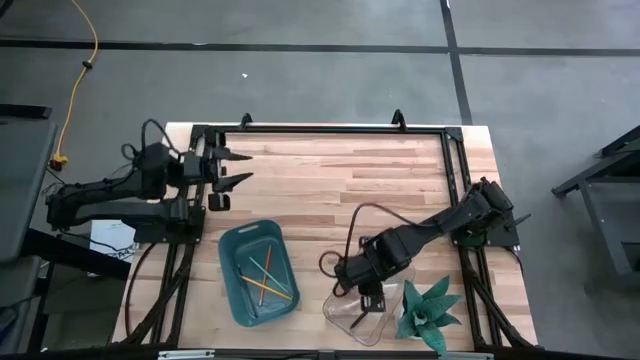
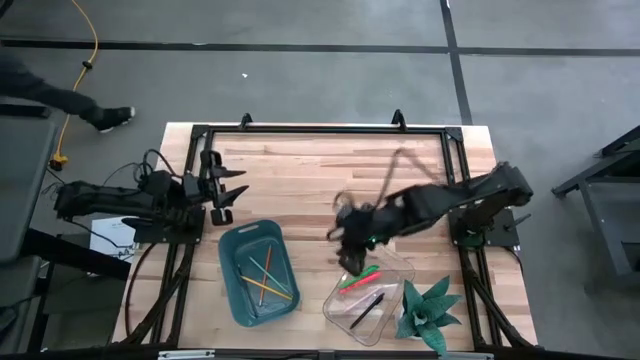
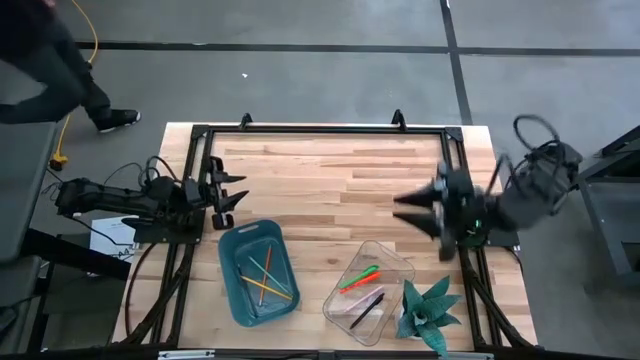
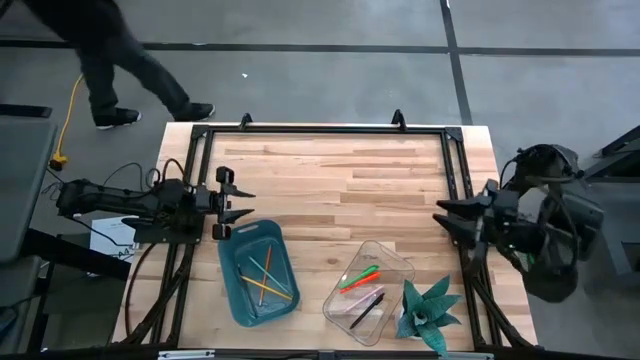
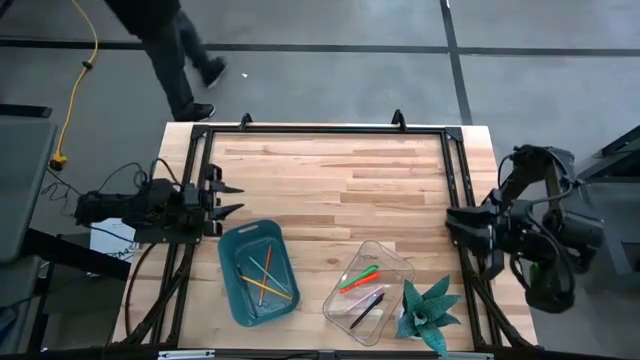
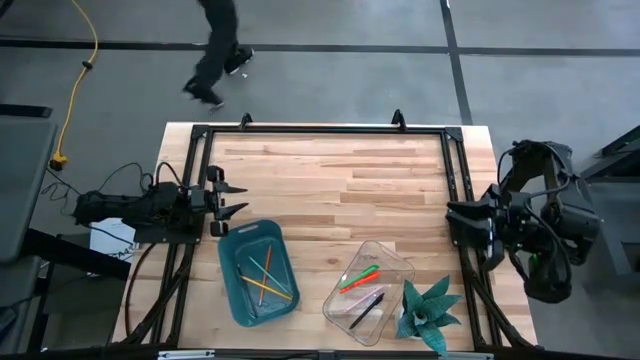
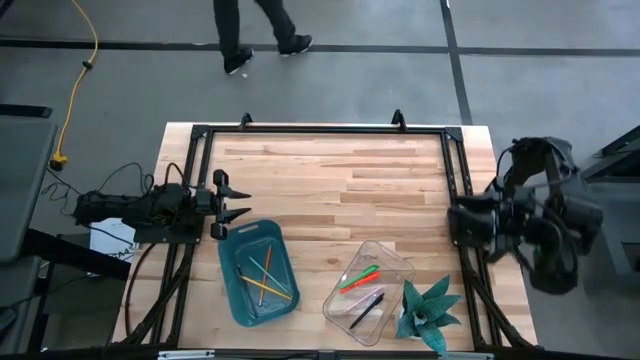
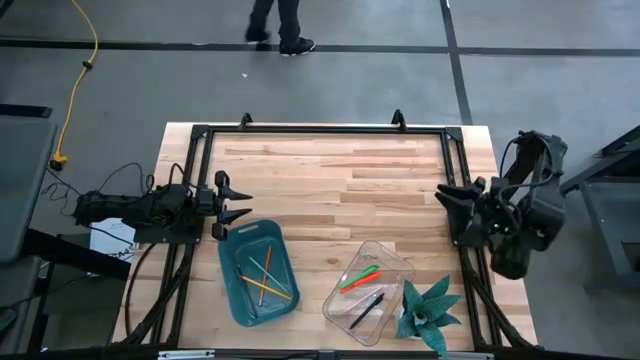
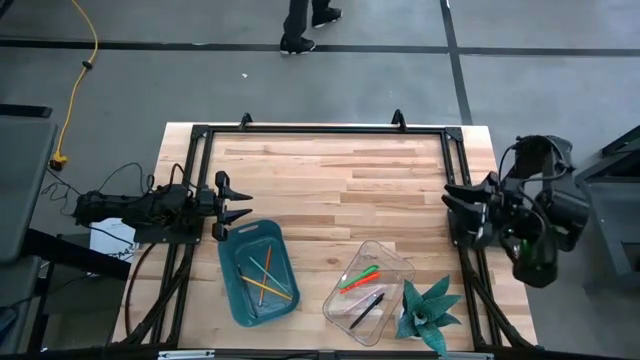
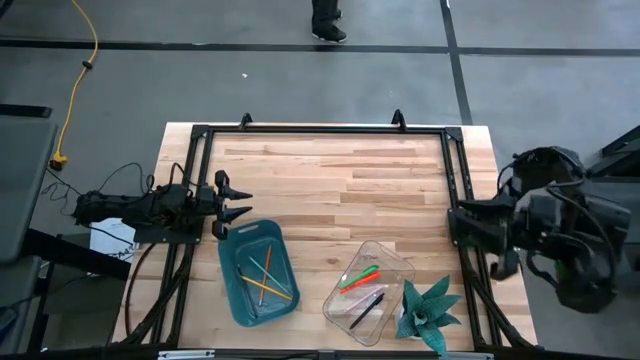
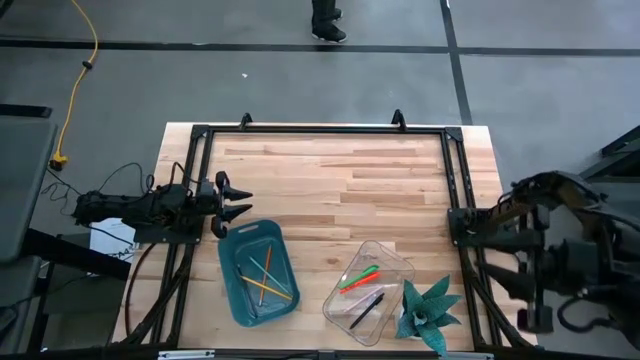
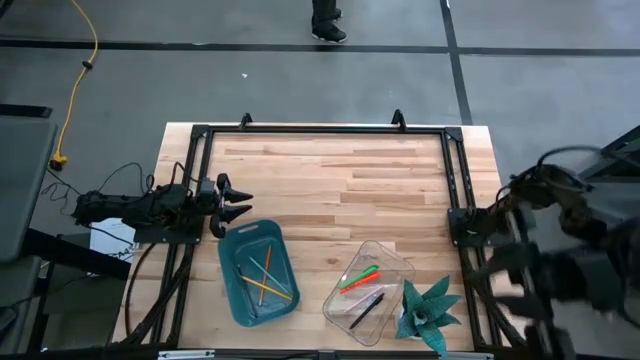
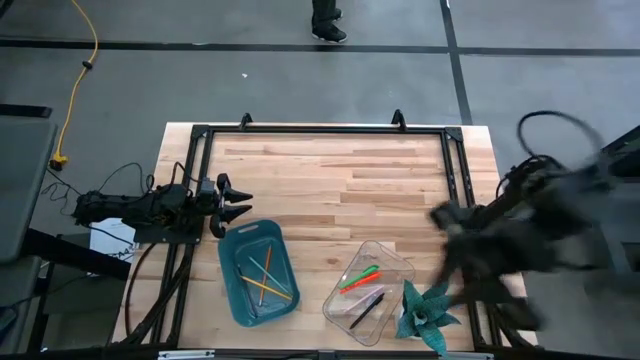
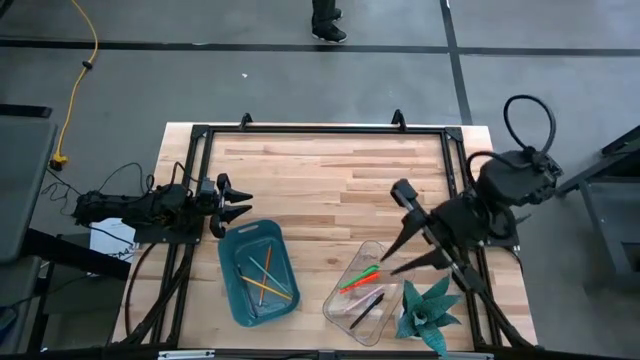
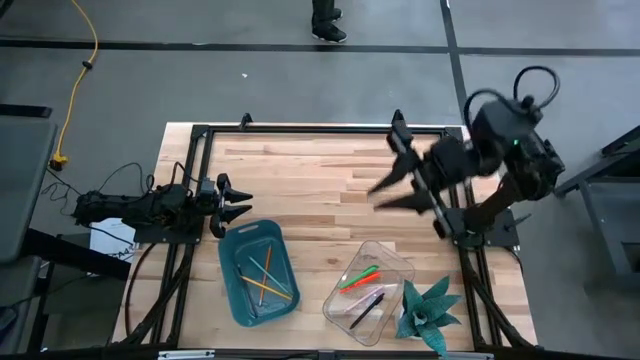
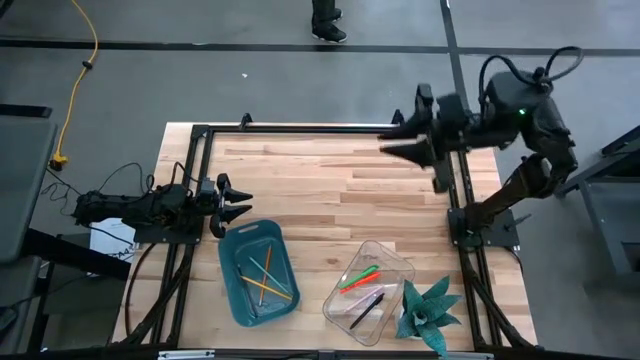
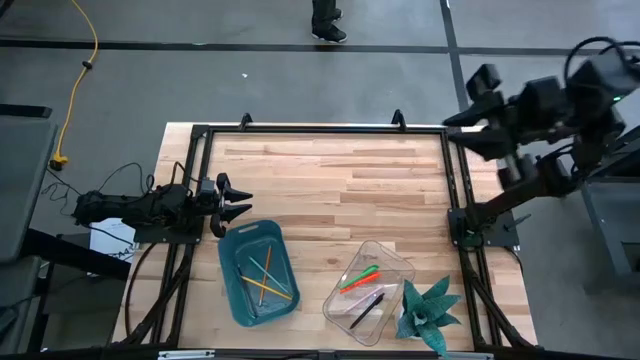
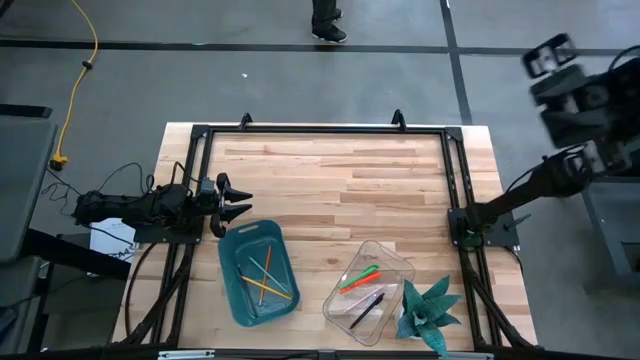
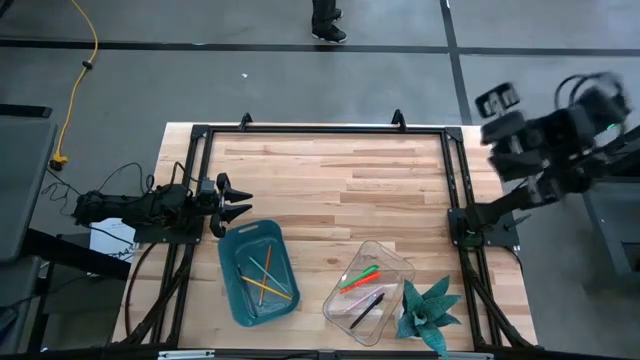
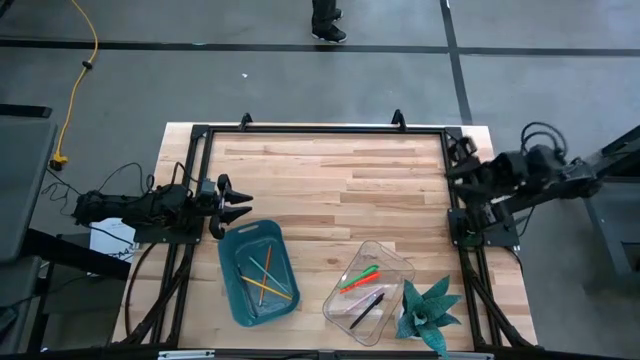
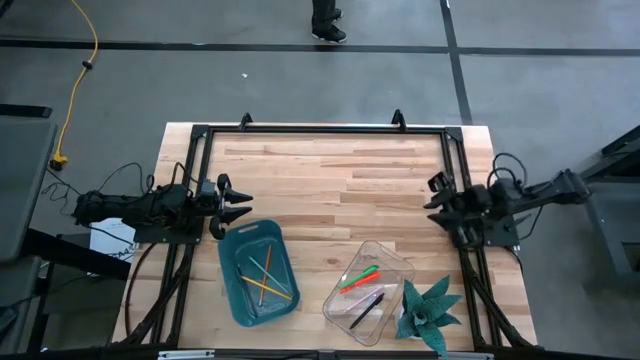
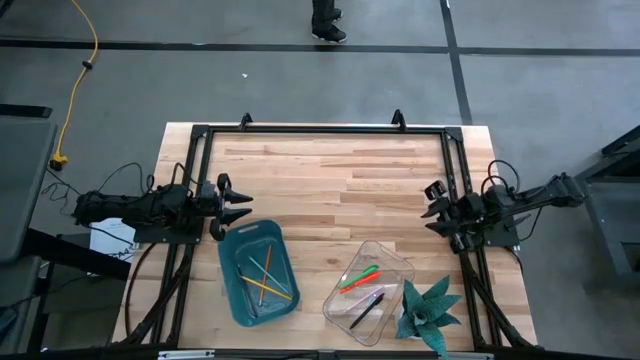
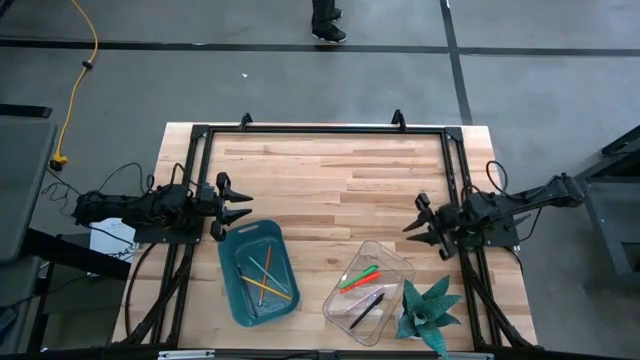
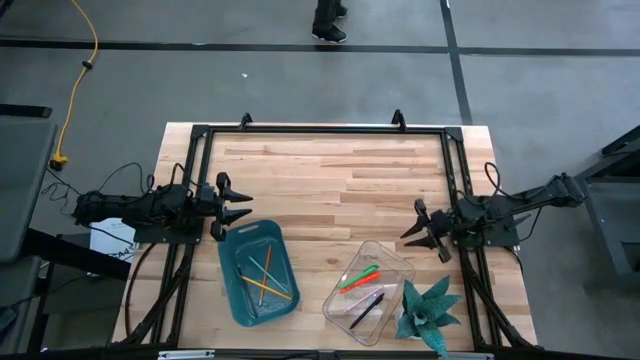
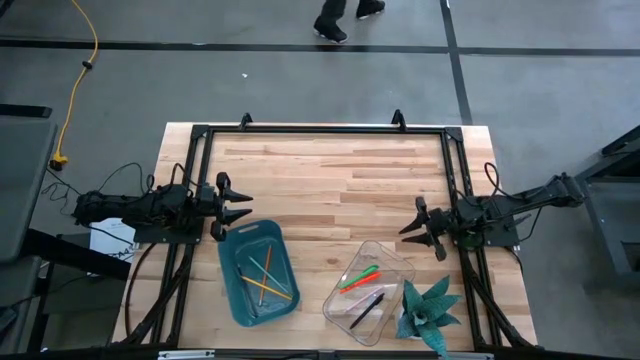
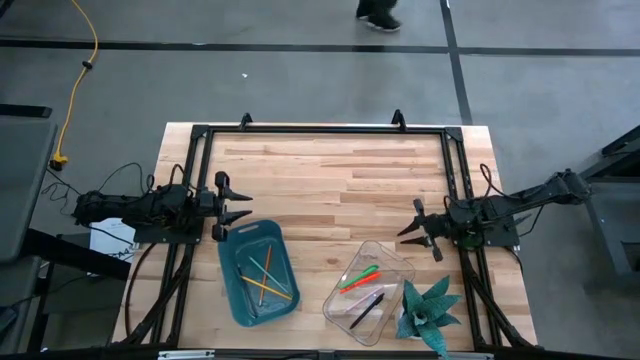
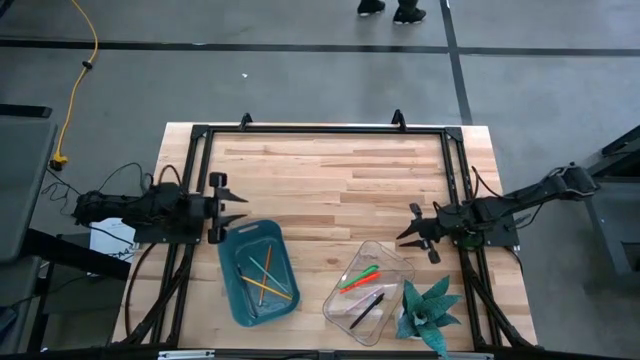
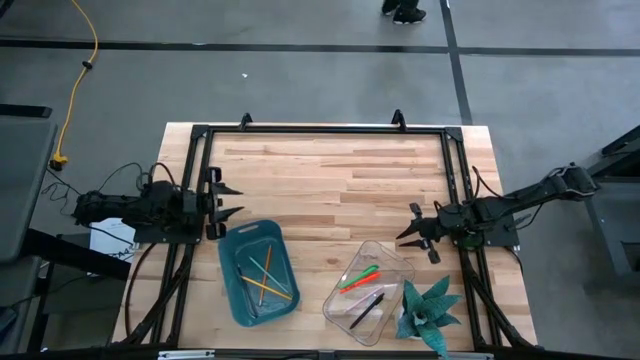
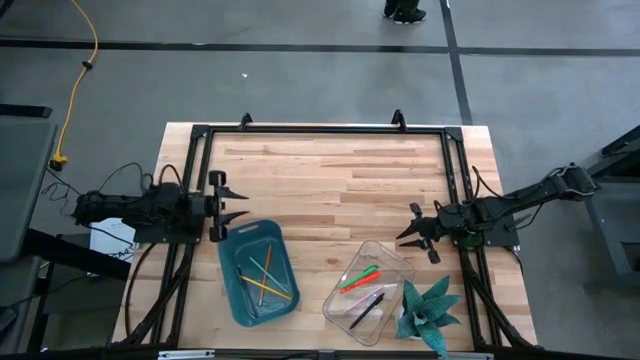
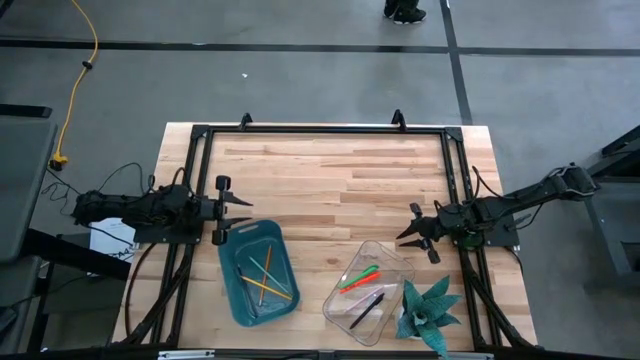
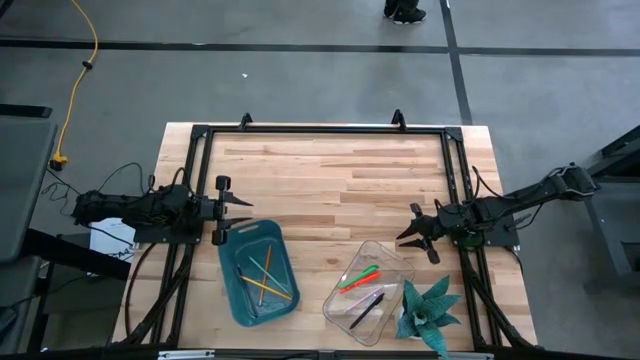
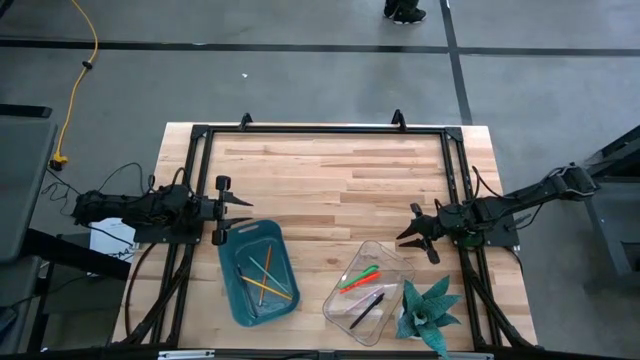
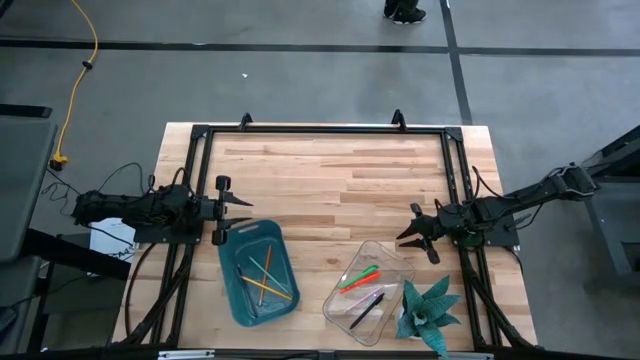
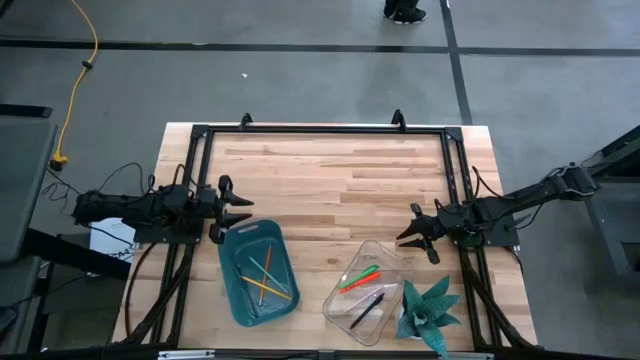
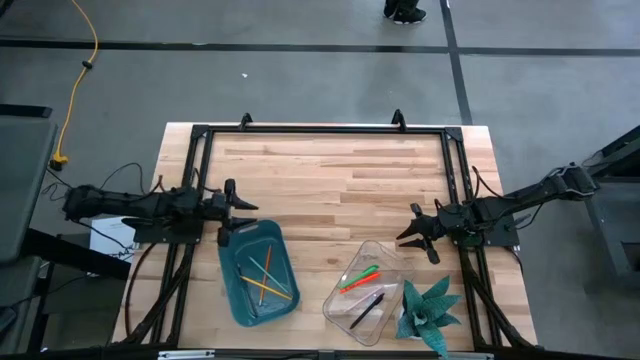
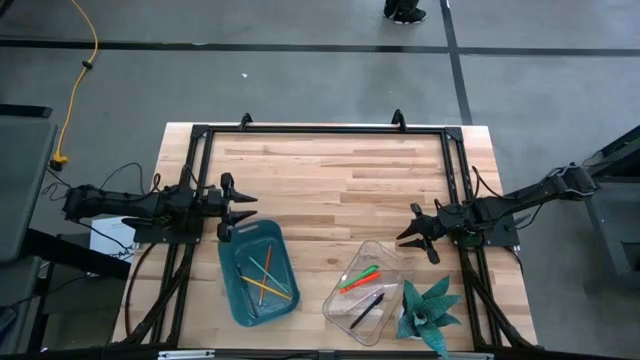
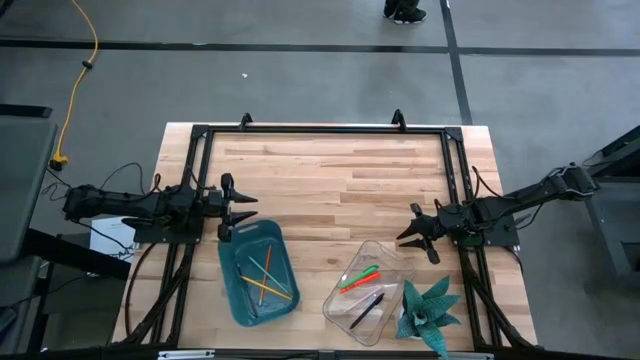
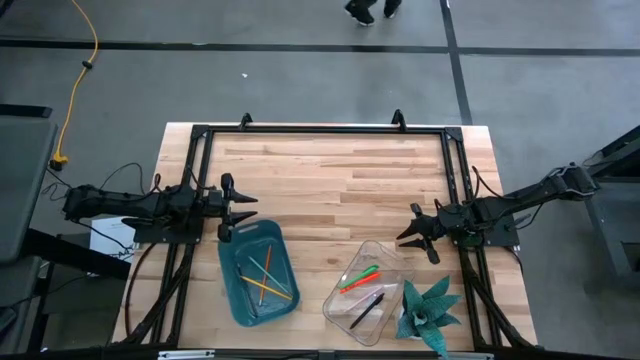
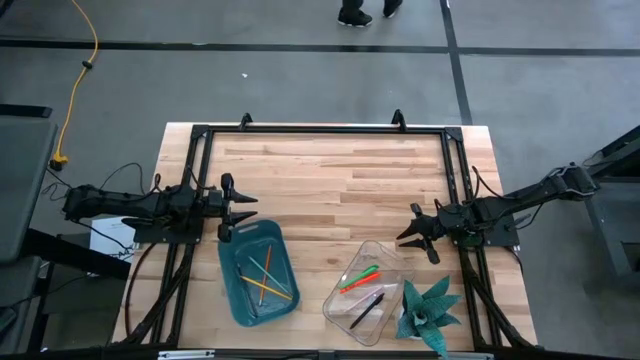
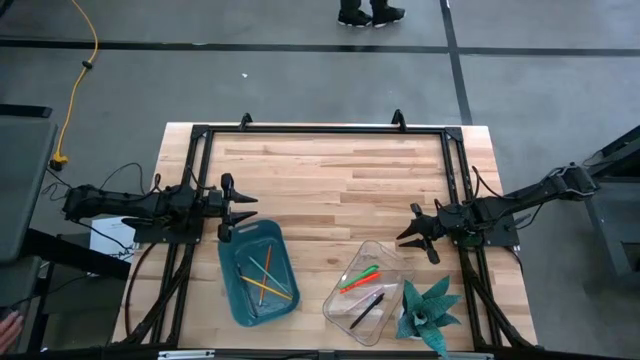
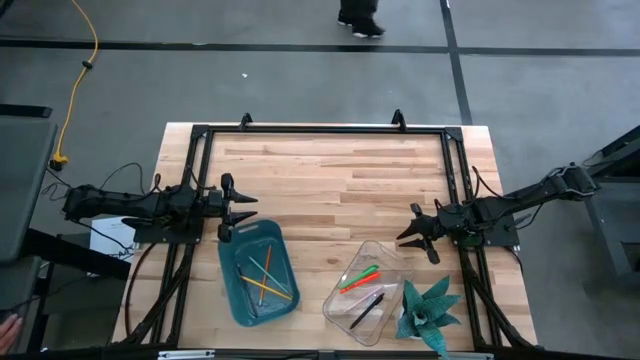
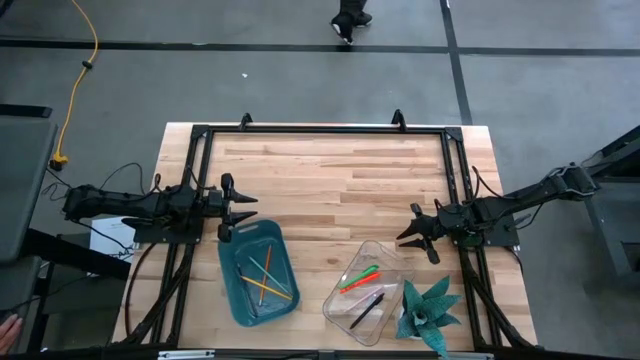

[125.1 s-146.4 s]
Task: Sort pens & pencils
Return to Home Position
